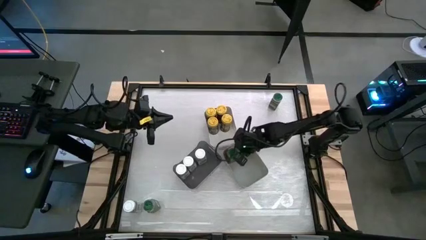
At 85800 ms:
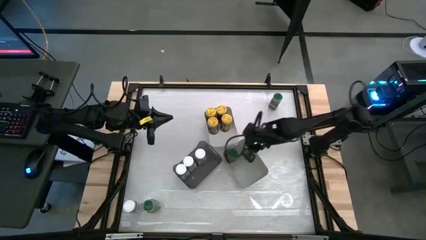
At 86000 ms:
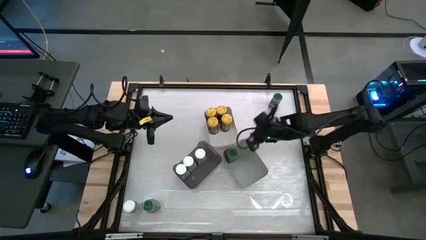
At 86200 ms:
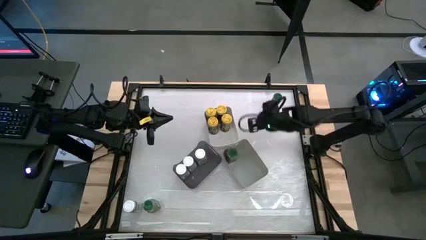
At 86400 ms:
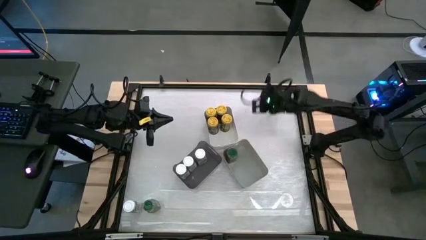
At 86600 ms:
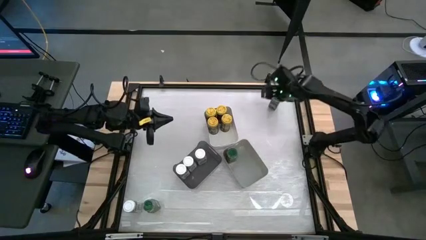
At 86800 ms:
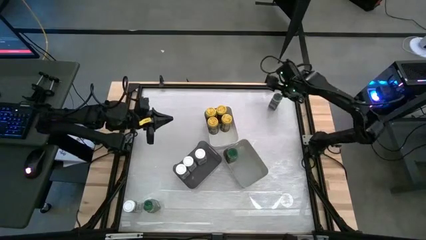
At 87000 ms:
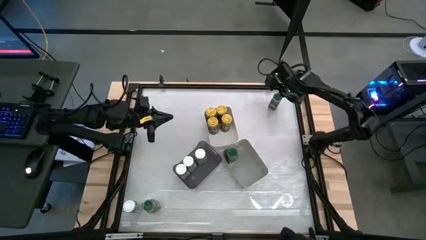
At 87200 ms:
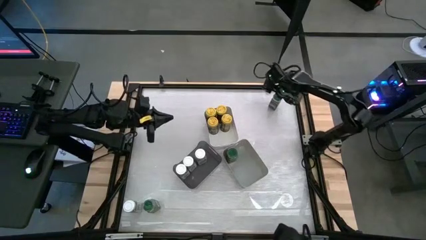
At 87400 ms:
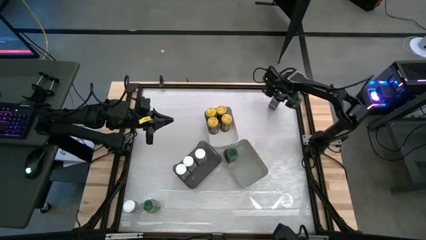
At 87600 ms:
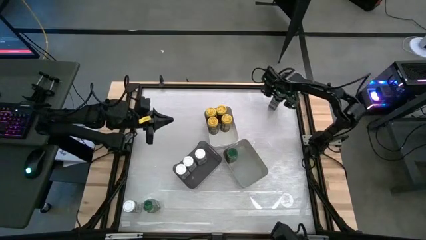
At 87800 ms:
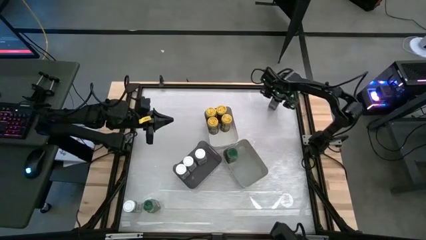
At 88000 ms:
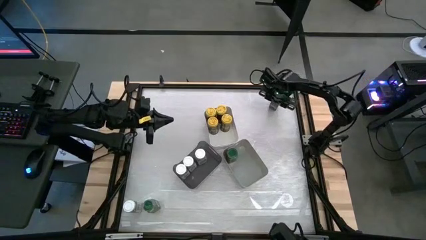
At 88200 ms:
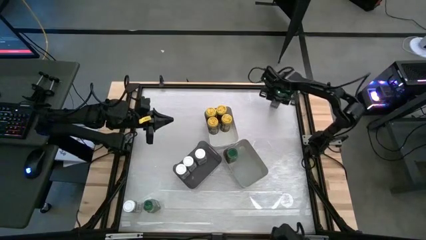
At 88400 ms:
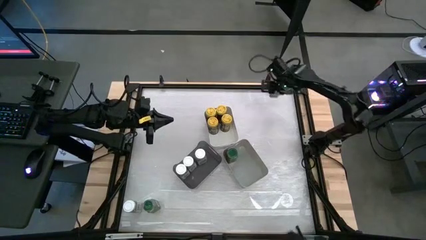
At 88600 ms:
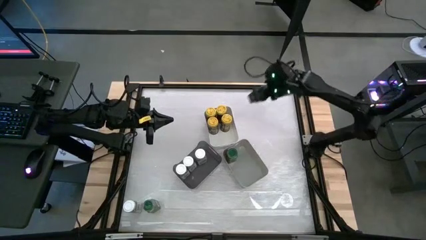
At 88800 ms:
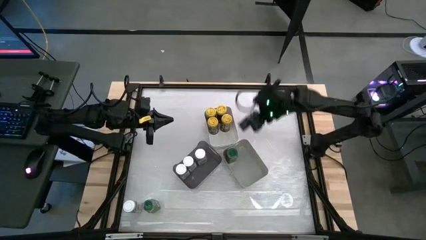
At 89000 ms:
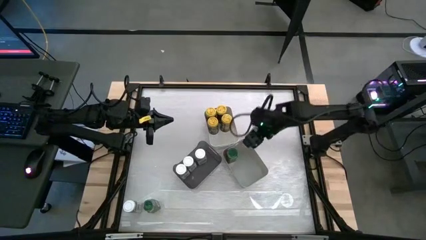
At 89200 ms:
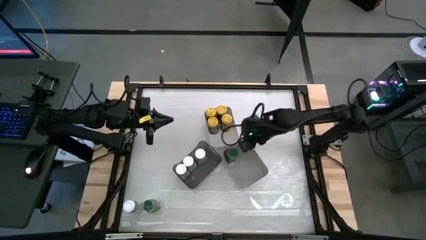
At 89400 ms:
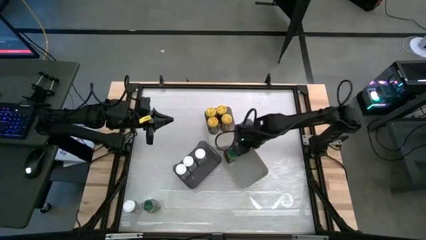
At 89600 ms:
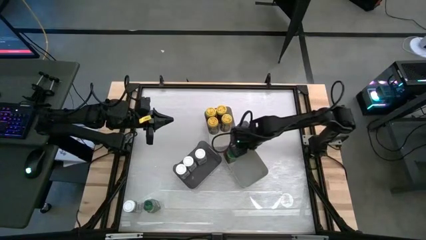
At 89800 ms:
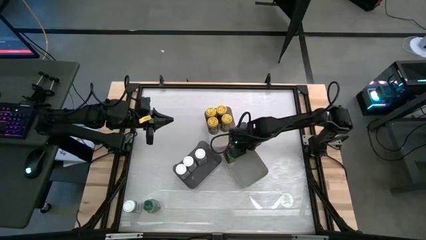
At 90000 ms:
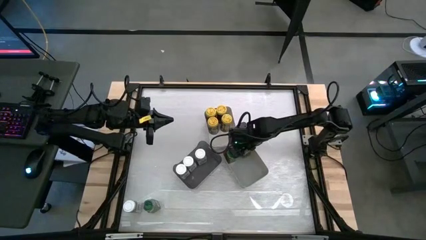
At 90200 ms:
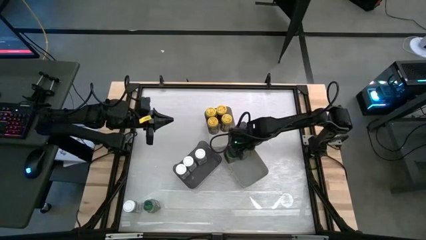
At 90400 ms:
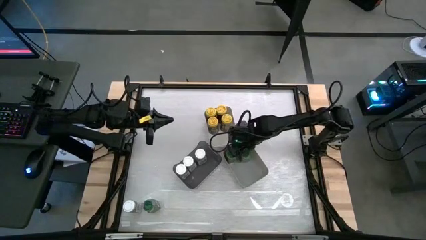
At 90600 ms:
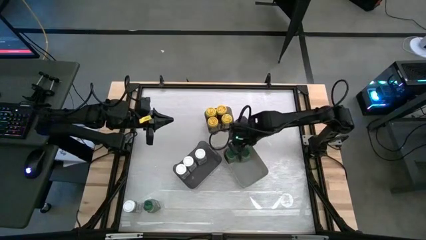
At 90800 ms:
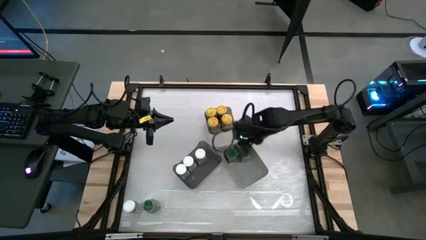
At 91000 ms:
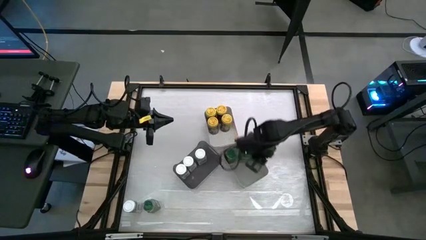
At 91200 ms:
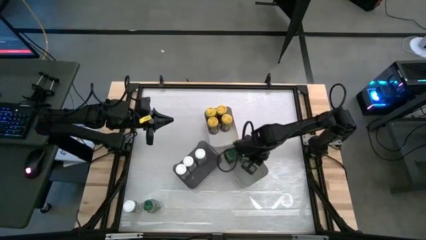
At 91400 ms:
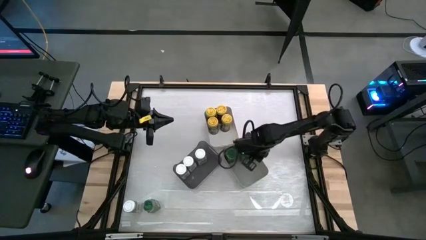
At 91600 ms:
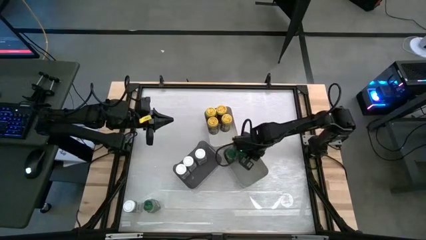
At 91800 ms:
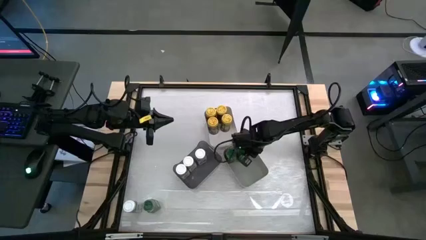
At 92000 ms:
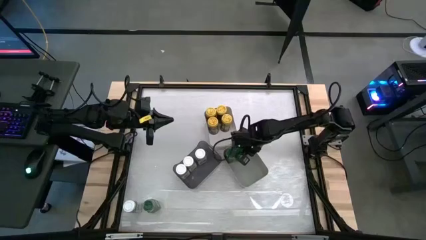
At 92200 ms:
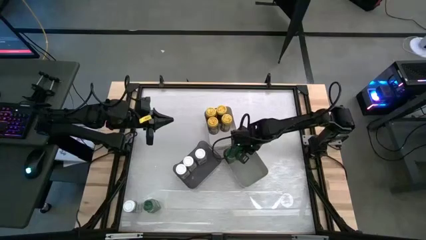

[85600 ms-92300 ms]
Task: Sort spices by type
Put the top green seasoning bottle into the gray bin

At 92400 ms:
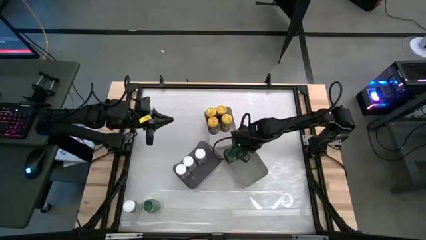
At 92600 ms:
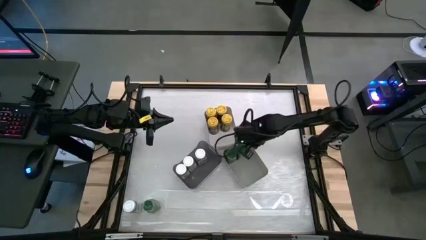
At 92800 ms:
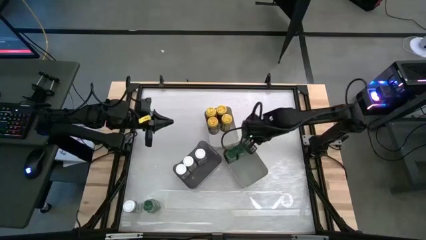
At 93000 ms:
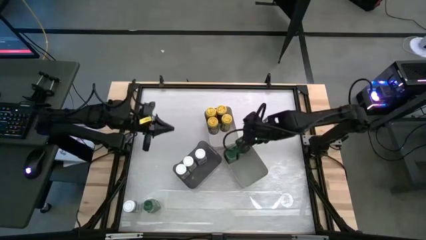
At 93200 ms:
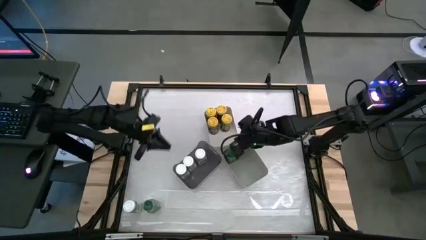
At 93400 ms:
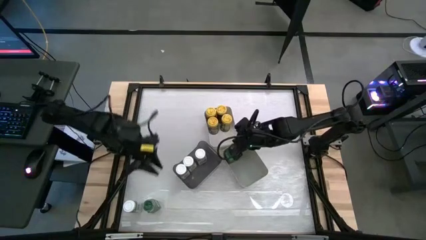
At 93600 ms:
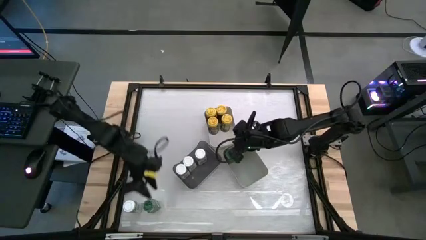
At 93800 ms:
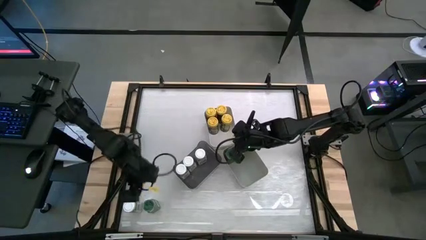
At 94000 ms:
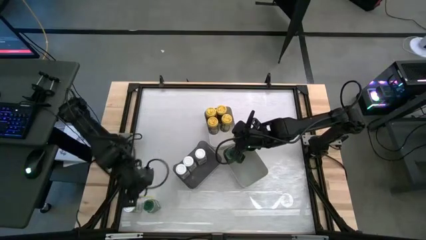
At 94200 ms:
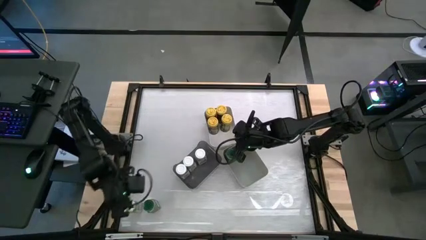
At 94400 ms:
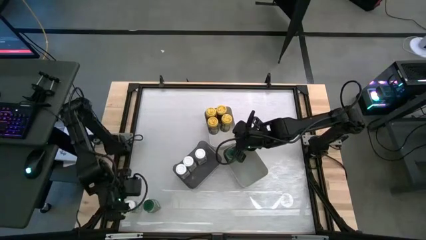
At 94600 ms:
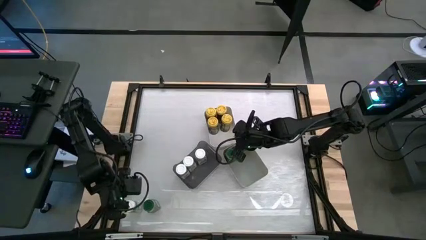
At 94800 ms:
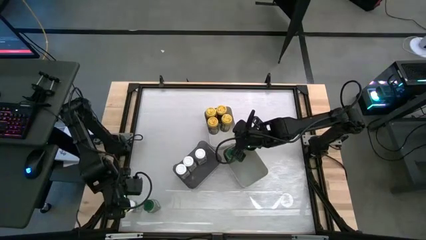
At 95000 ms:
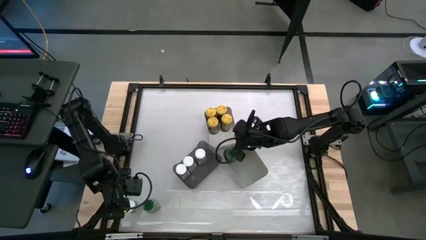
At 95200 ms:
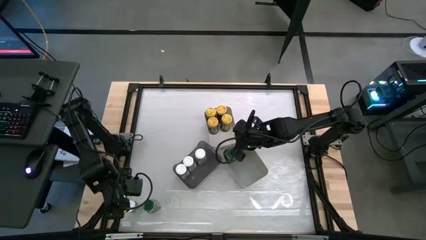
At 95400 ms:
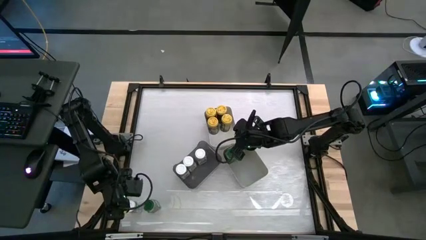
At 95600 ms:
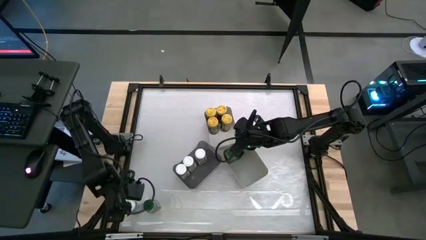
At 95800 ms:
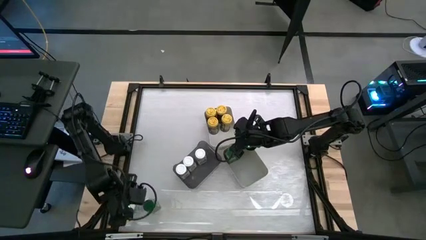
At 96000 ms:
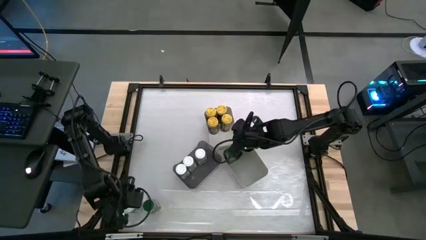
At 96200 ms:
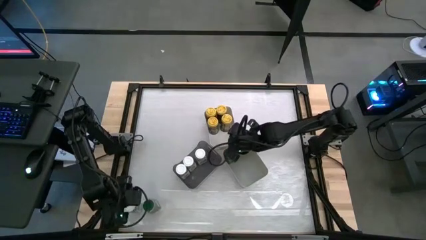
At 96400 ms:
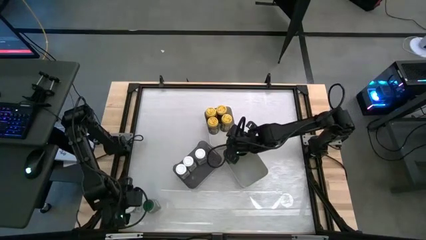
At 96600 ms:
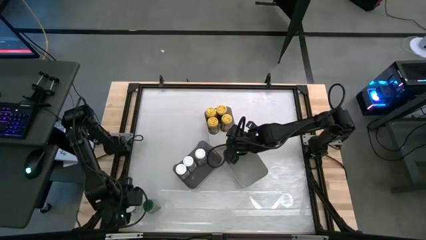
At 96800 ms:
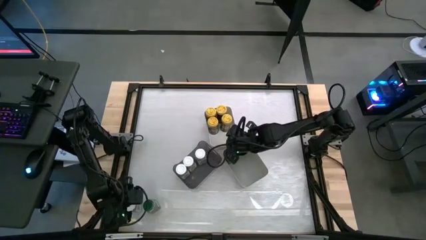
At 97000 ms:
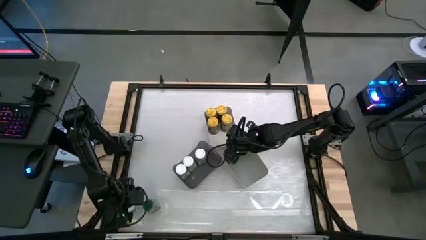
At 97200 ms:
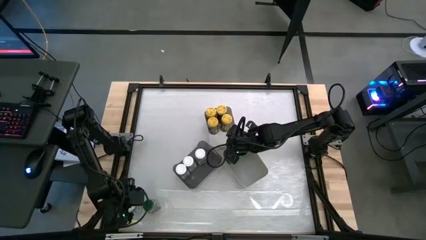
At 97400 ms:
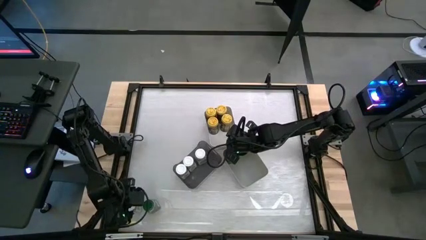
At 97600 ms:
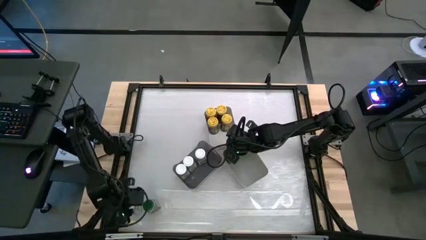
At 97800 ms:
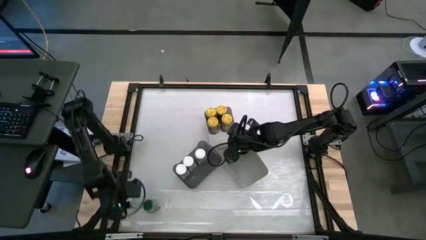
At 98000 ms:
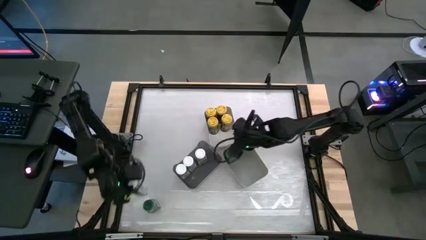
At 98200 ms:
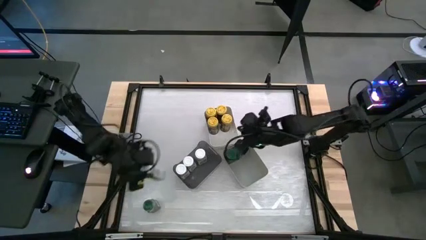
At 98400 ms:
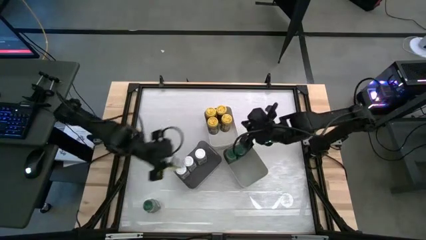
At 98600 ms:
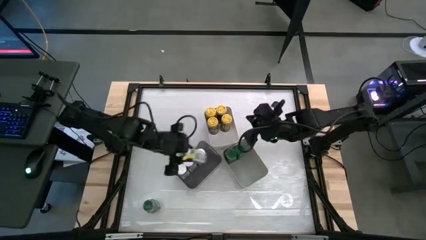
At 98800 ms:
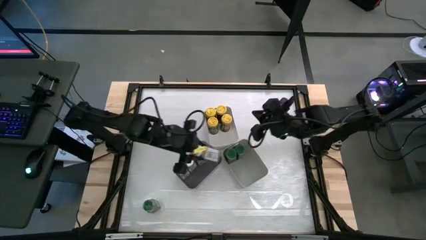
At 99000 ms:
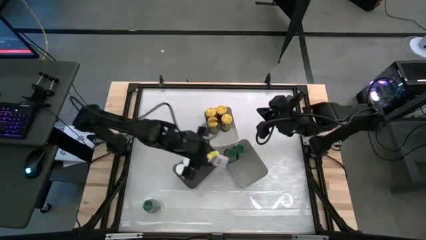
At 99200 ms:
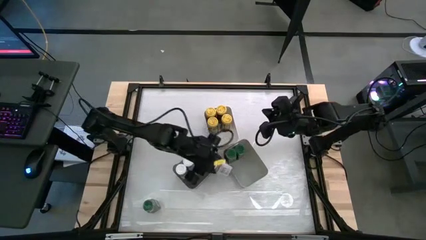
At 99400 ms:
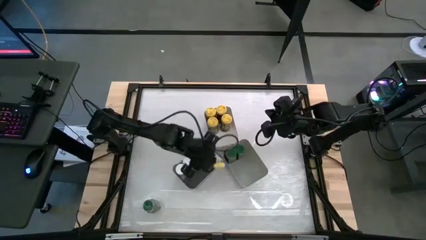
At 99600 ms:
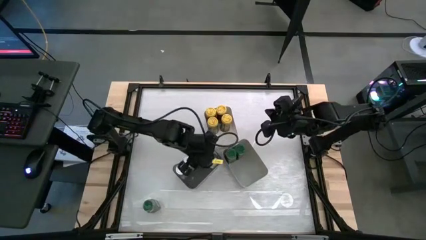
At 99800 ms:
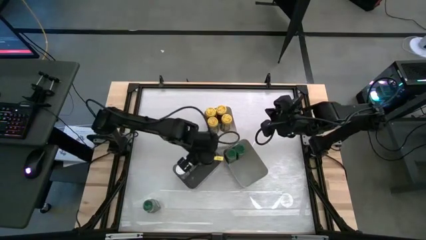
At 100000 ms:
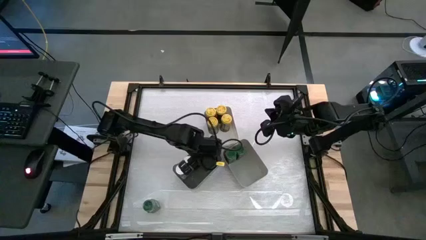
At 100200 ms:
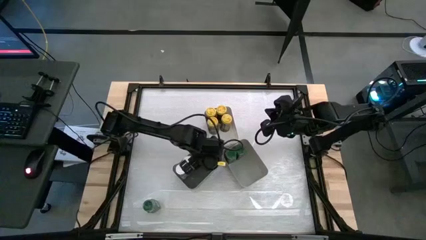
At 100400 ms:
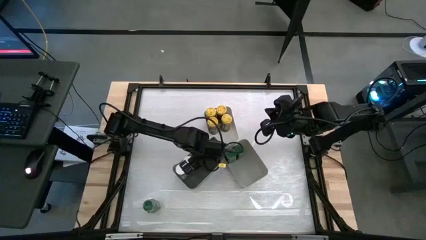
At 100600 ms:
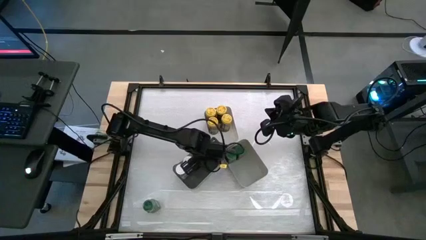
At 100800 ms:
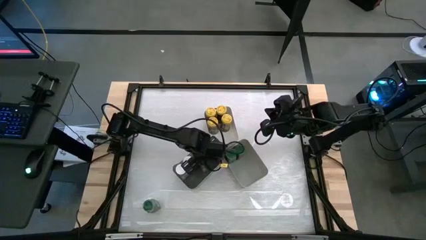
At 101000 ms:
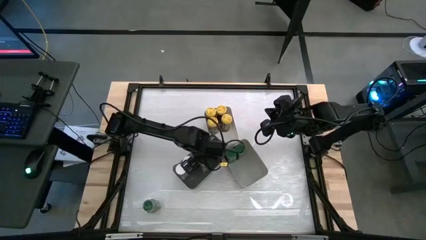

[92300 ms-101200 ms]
Put the white seasoning bottle into the black bin
